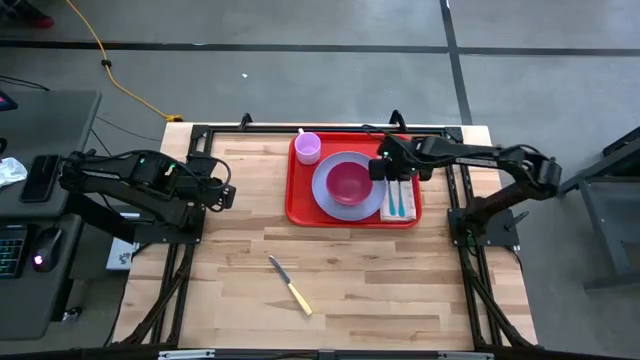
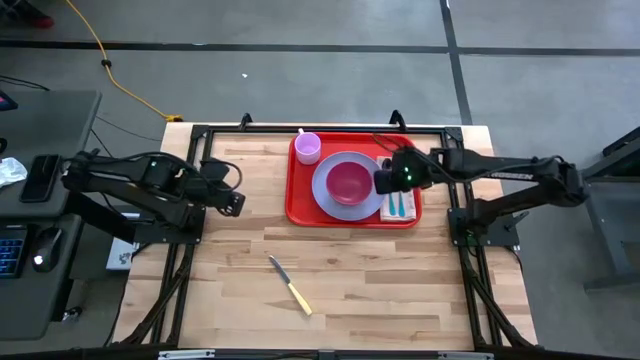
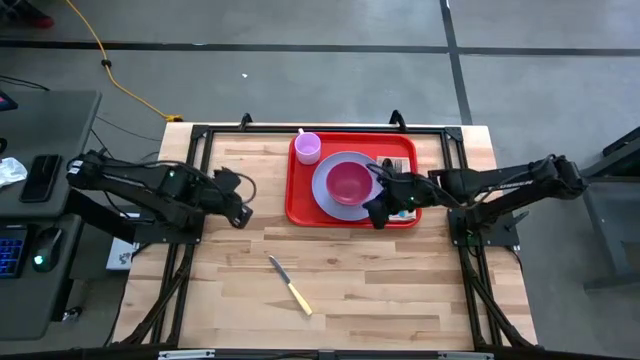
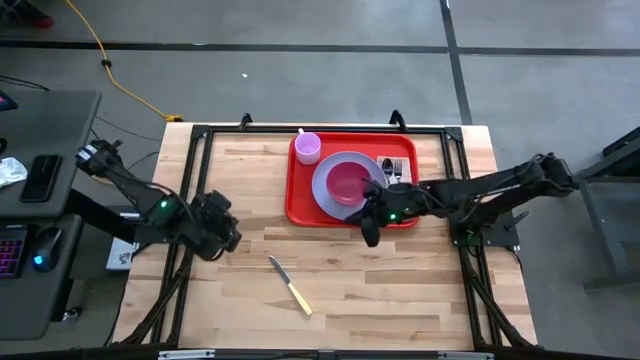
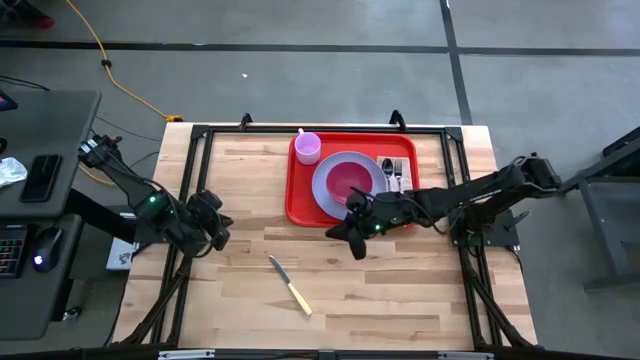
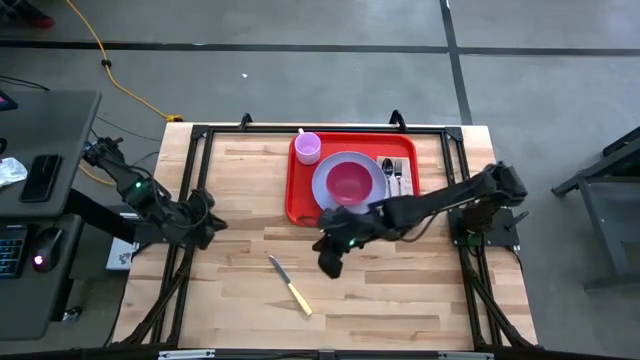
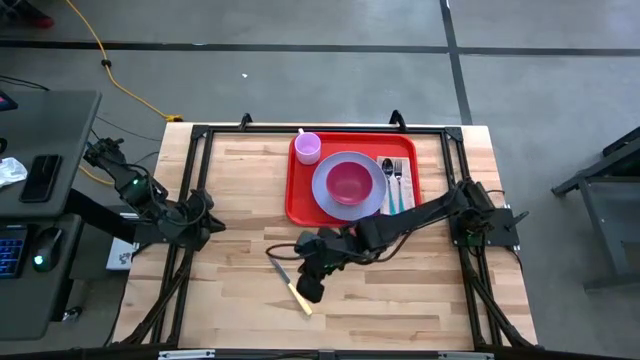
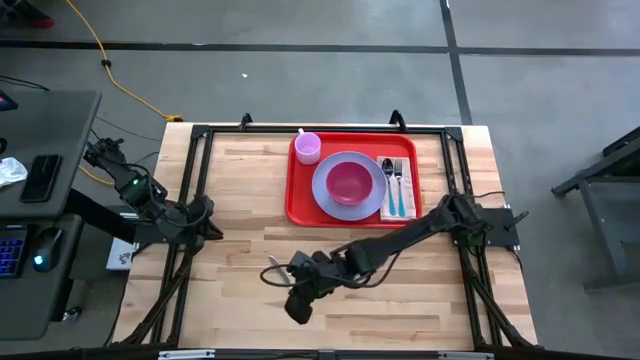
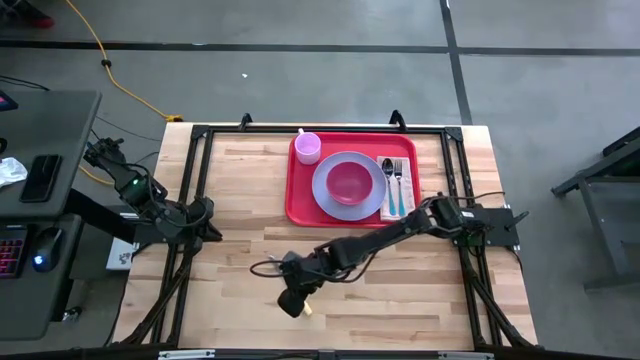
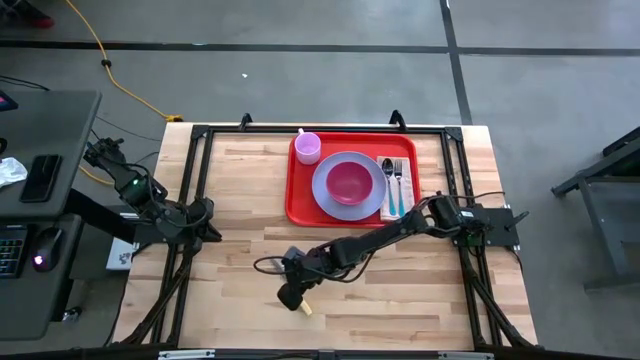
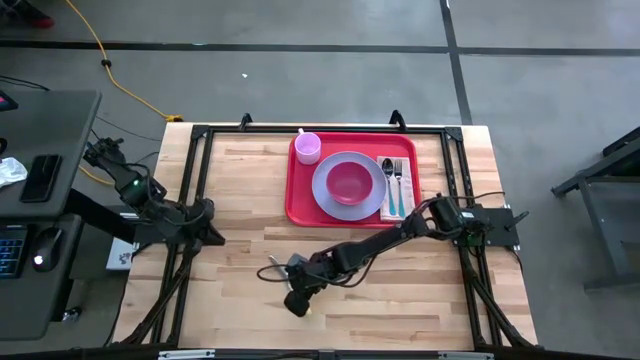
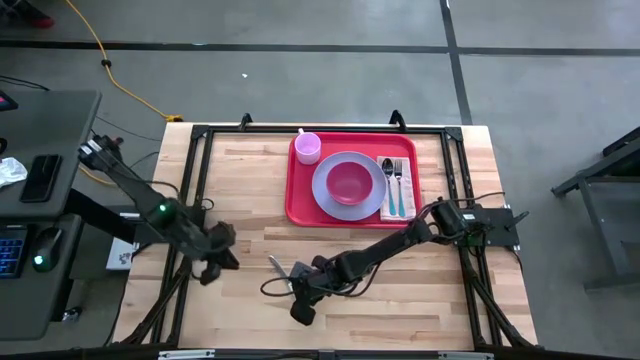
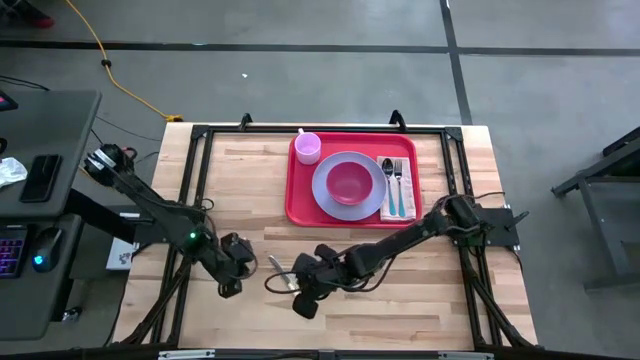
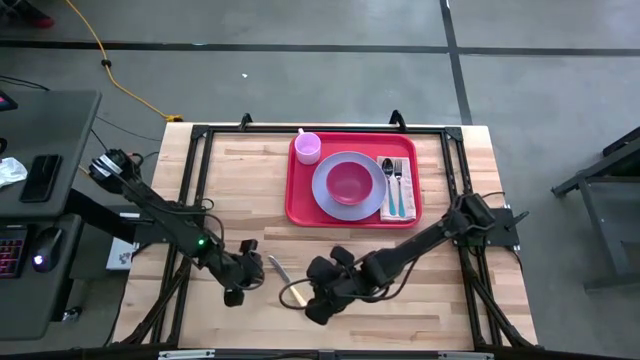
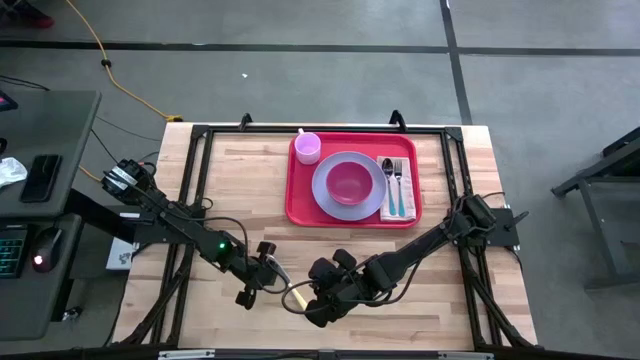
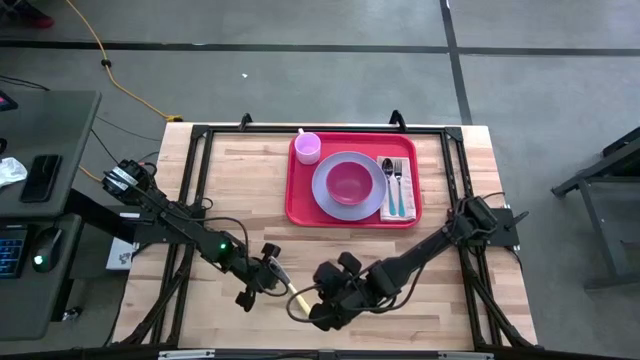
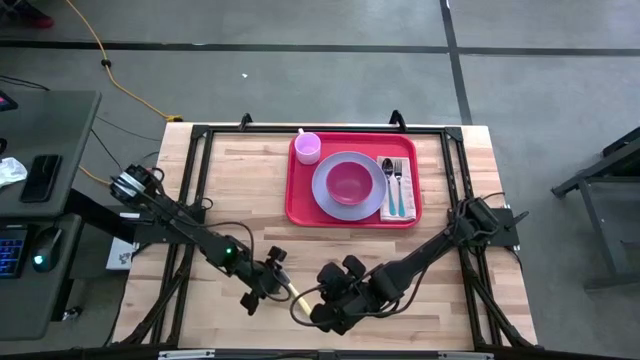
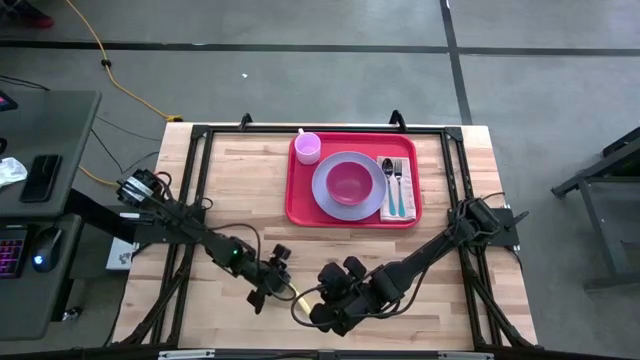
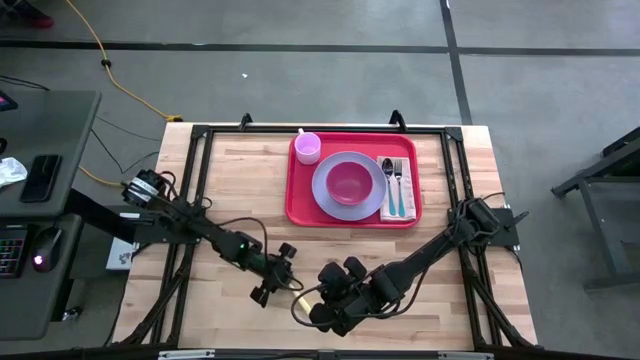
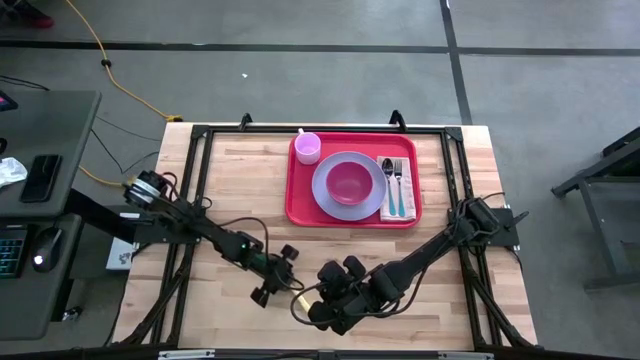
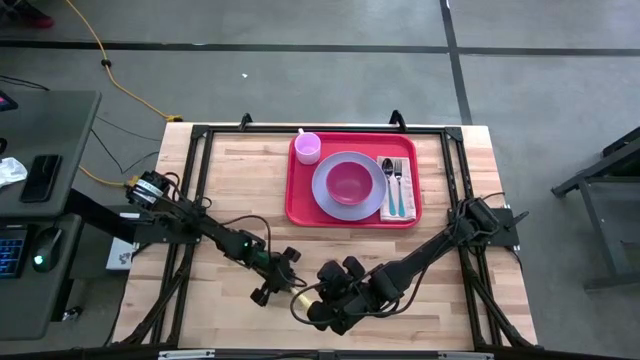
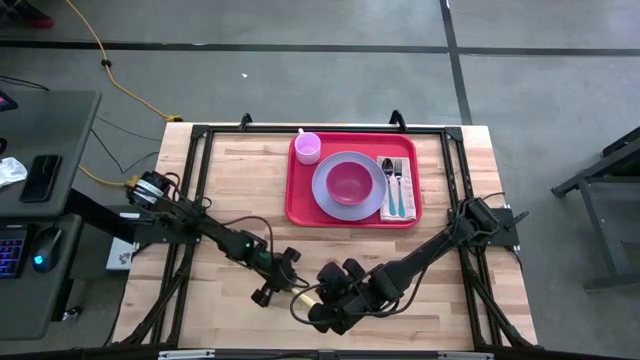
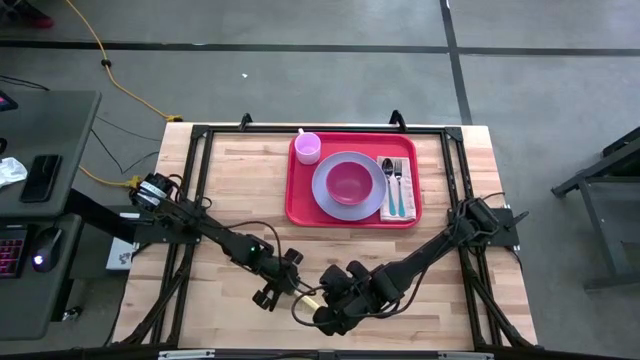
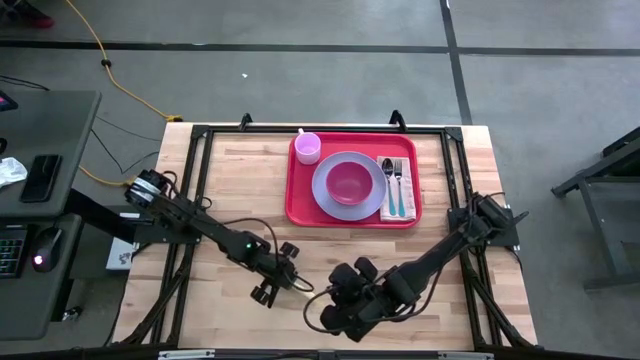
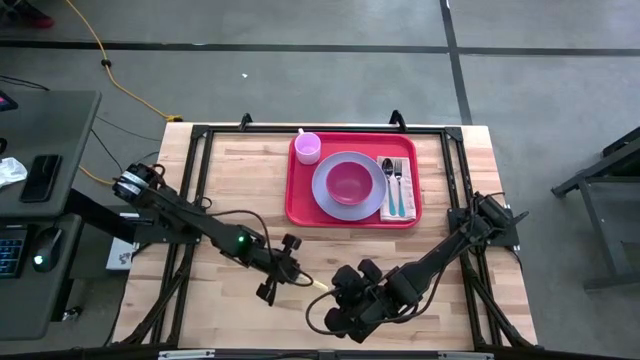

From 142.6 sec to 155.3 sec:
Task: Set up tray
Put the yellow knife on top of the napkin to the right of the blue fork in the red tray

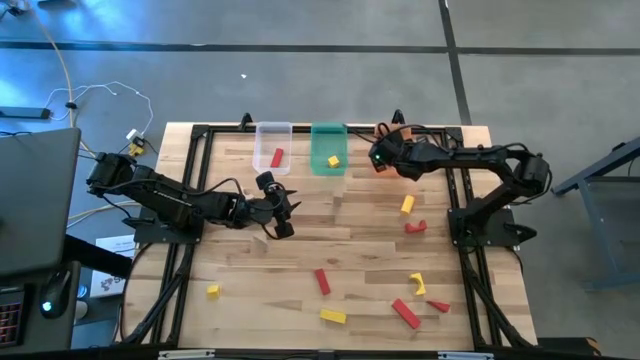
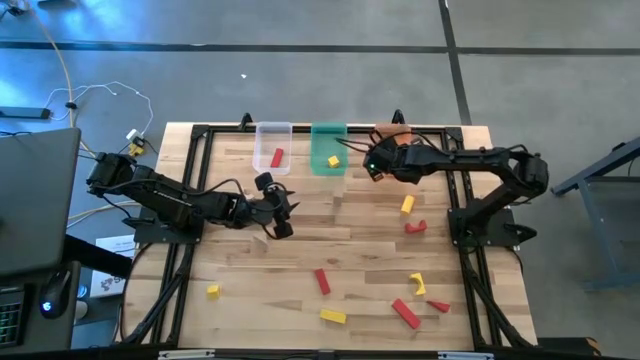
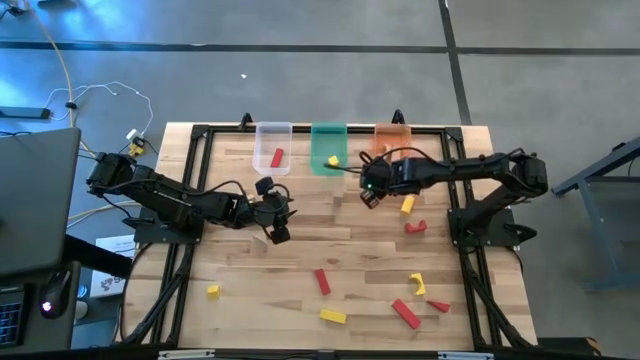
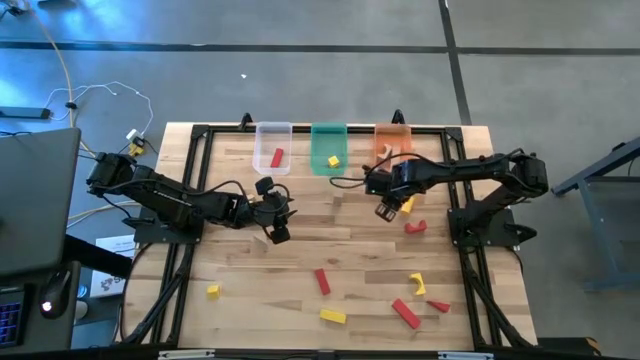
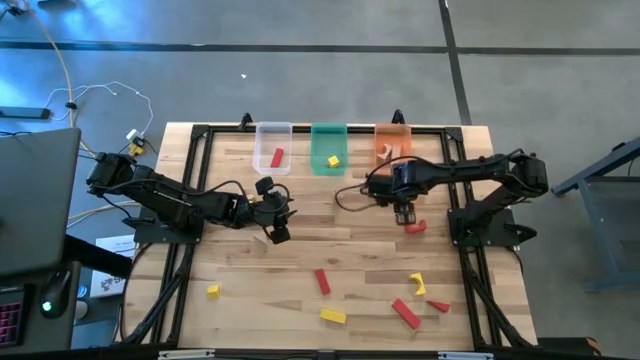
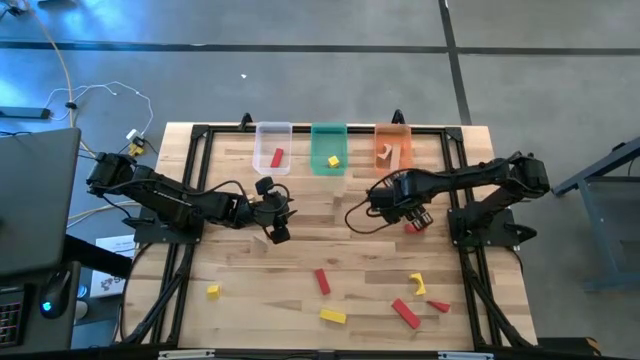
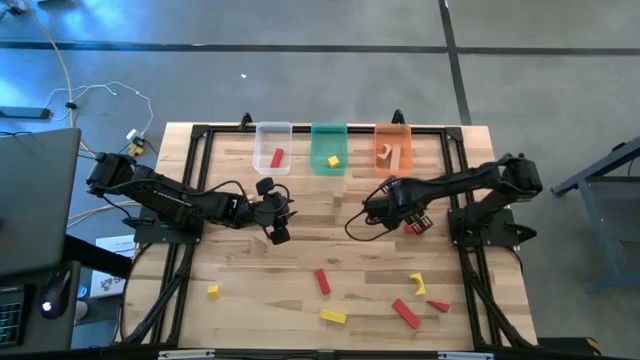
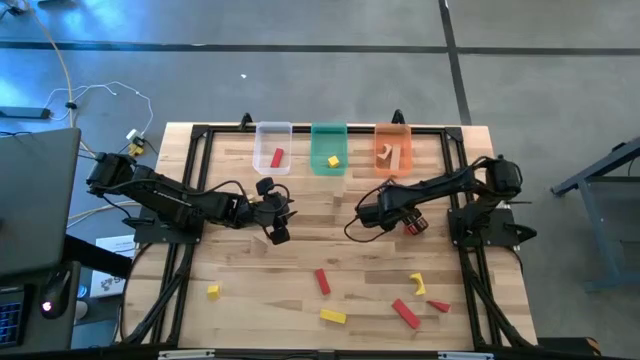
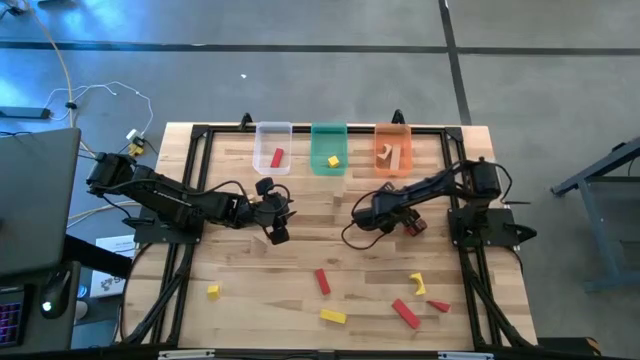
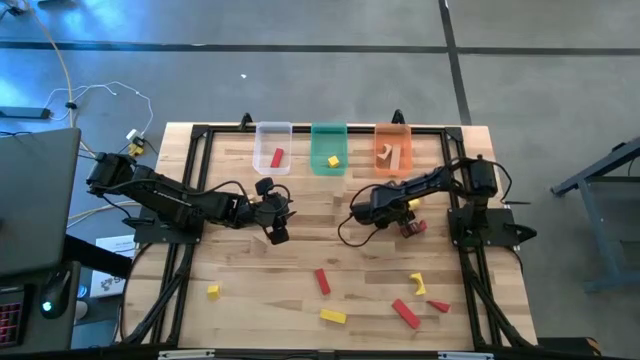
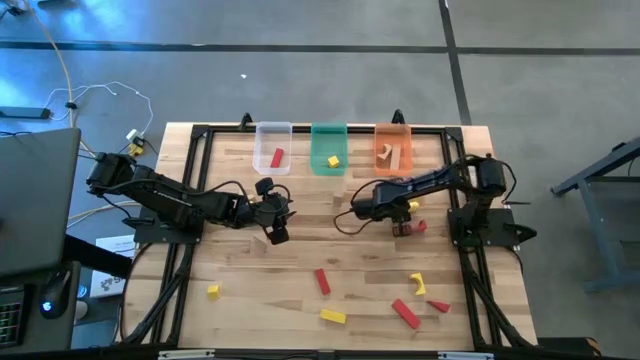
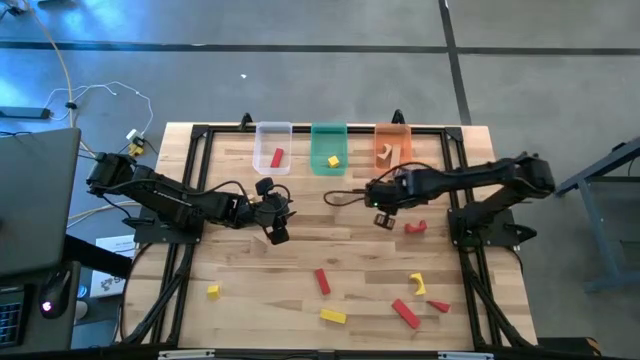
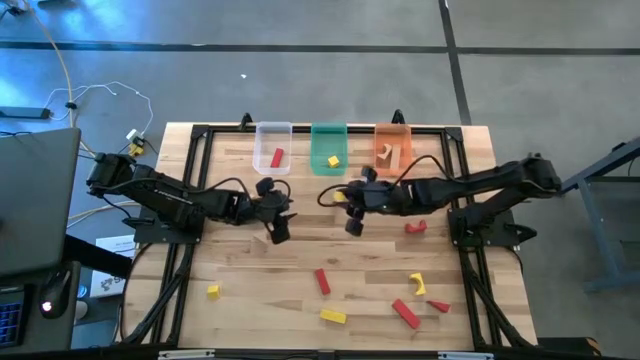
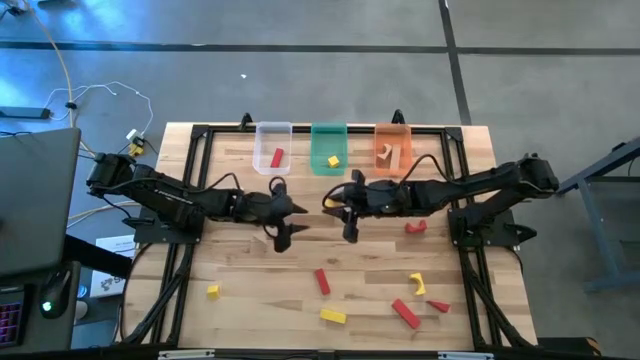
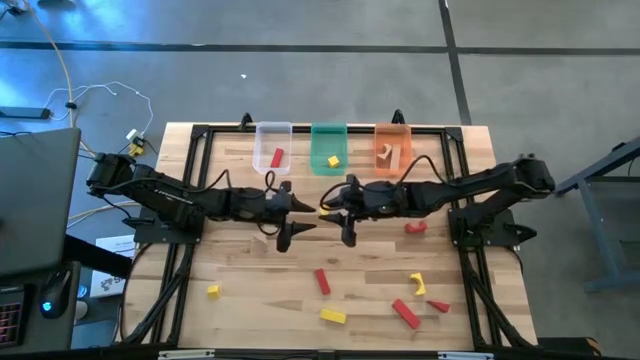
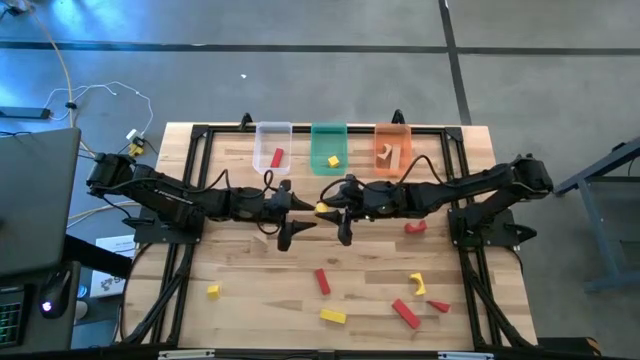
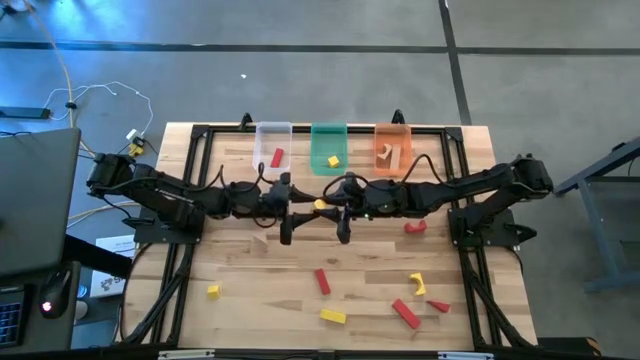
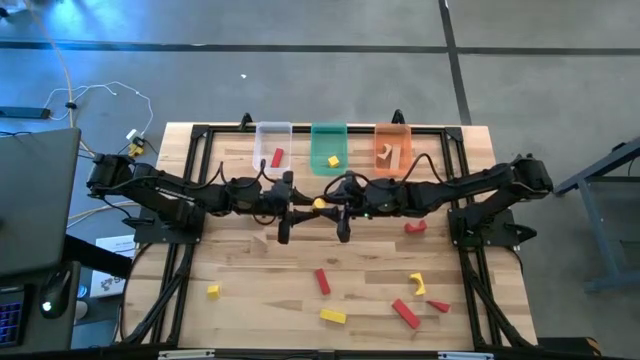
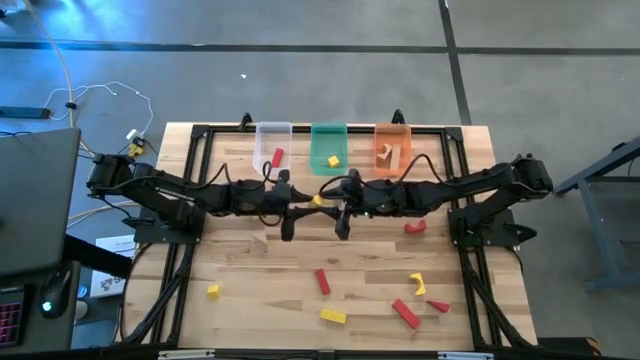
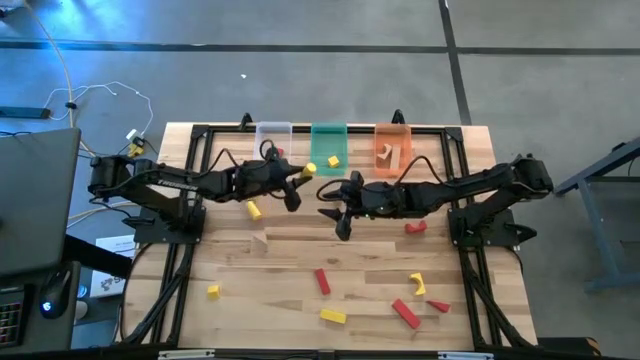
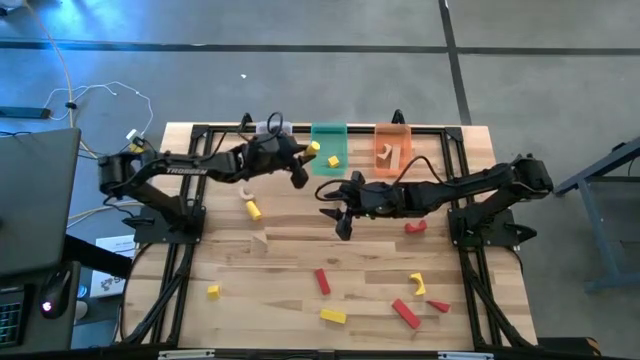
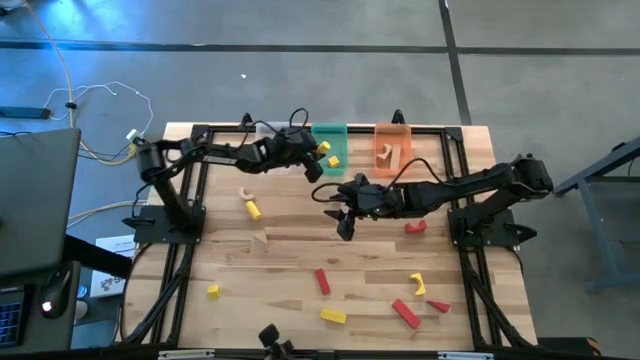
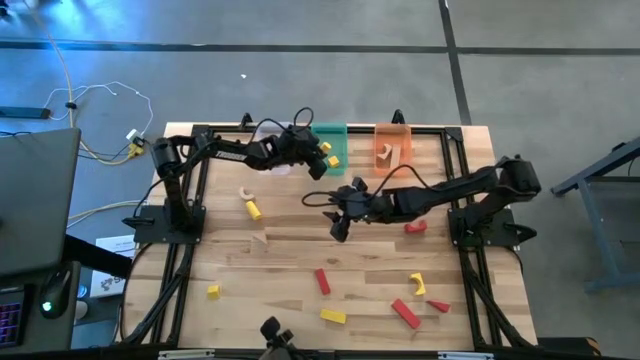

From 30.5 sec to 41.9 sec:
Task: Sort & place blocks by color
Put the yellow block into the green bin
